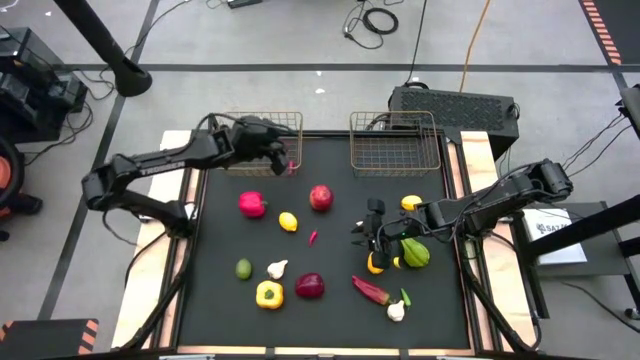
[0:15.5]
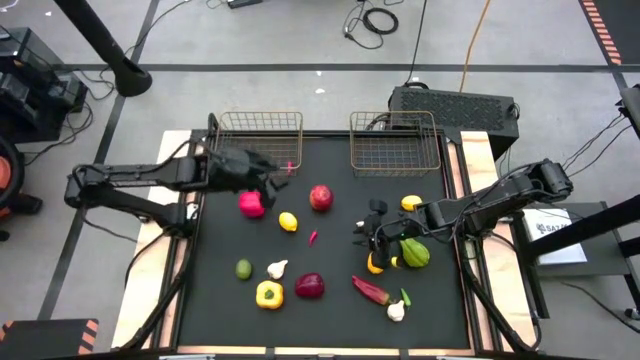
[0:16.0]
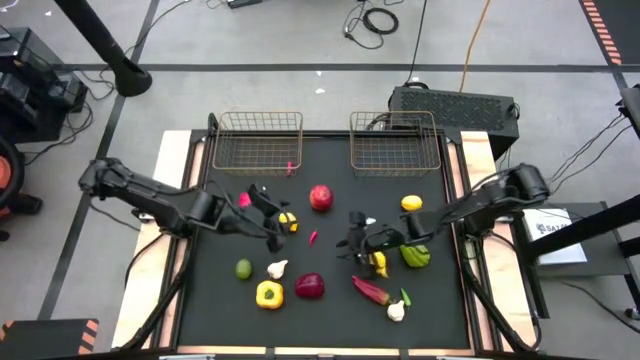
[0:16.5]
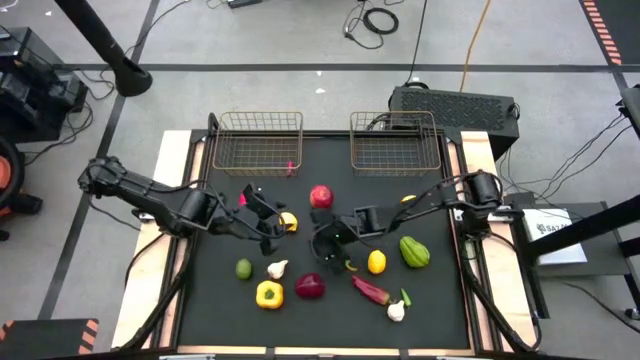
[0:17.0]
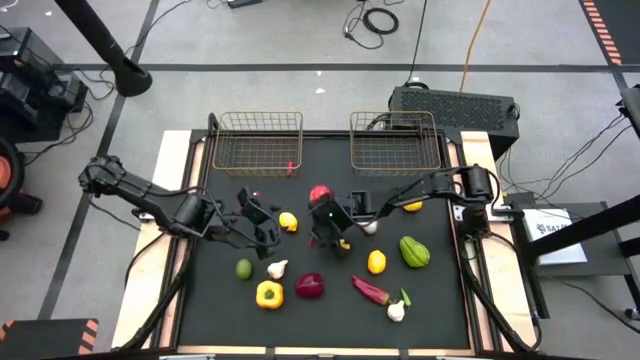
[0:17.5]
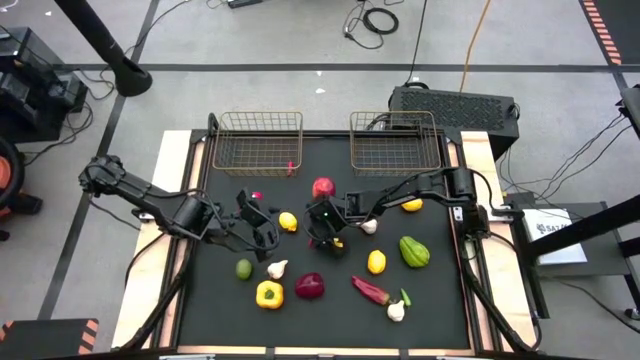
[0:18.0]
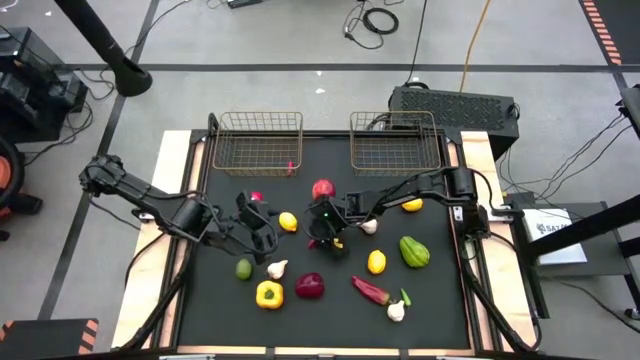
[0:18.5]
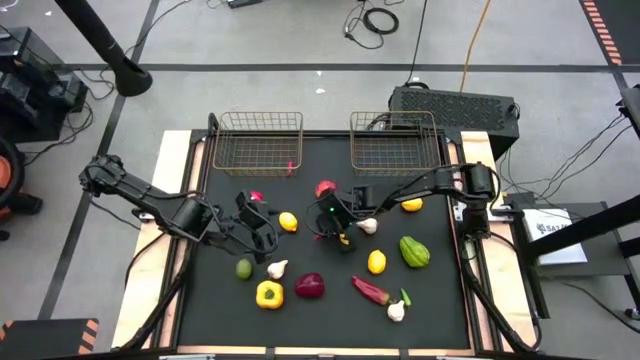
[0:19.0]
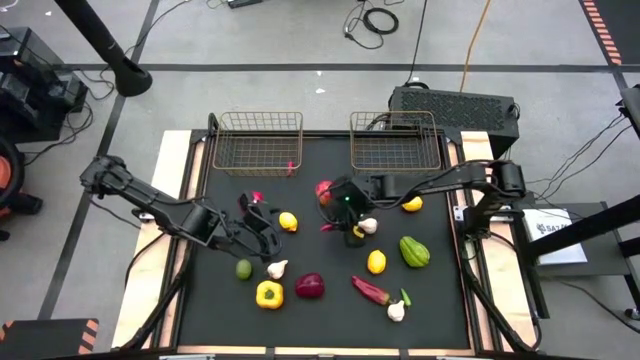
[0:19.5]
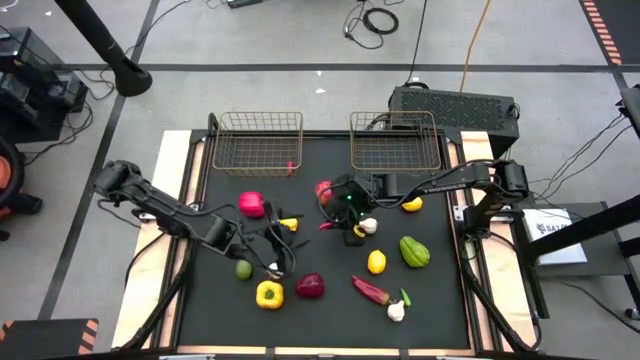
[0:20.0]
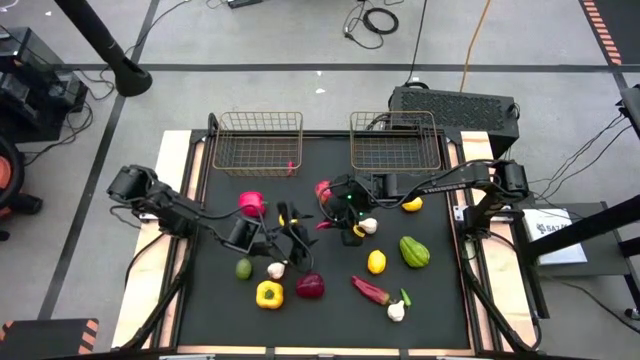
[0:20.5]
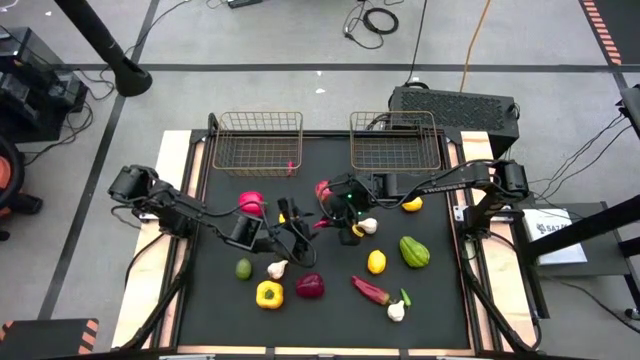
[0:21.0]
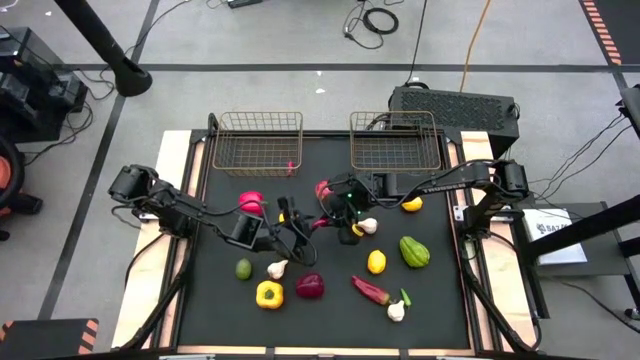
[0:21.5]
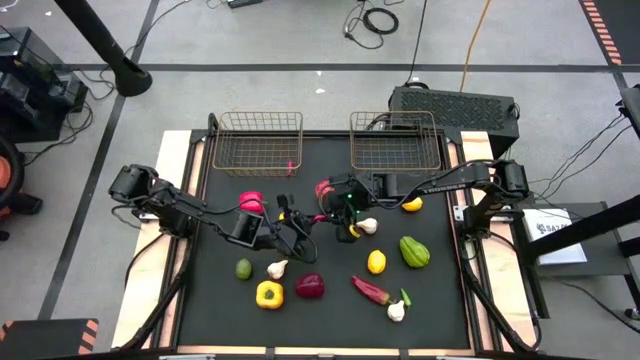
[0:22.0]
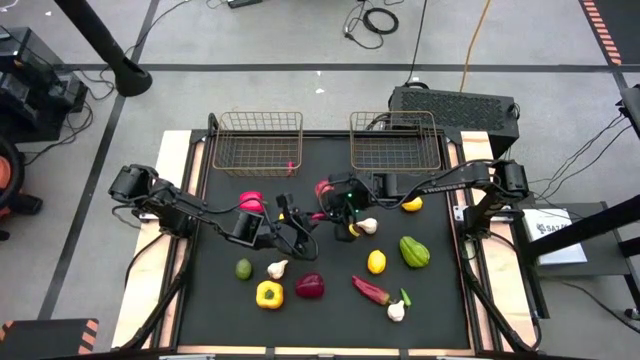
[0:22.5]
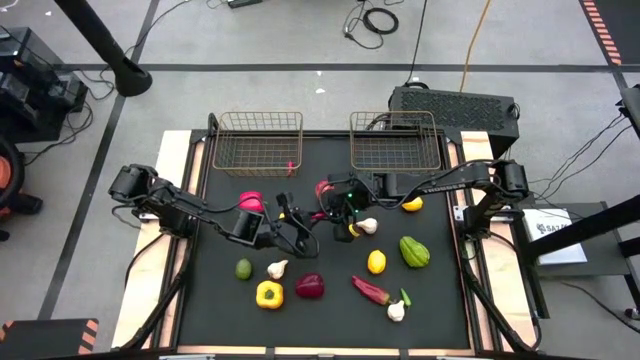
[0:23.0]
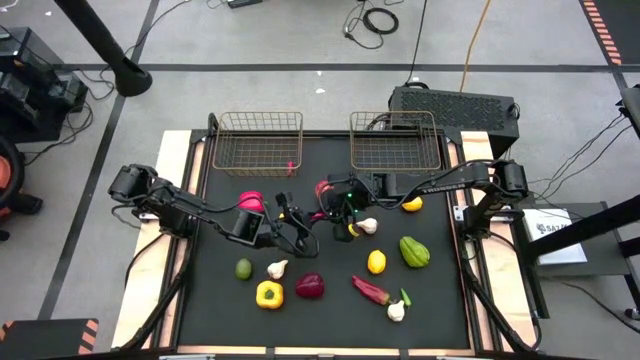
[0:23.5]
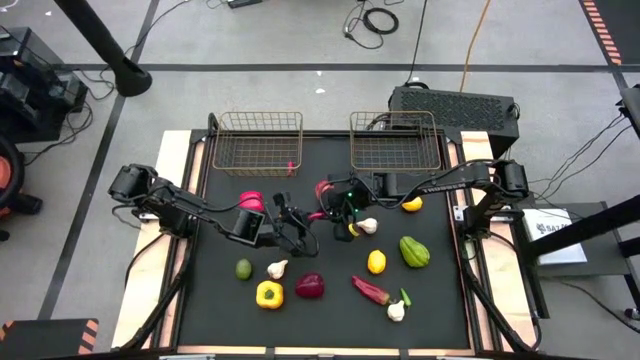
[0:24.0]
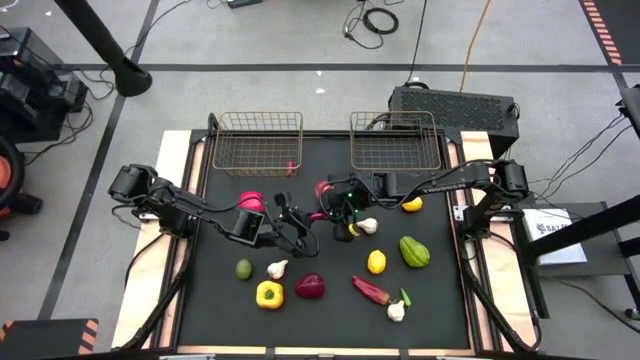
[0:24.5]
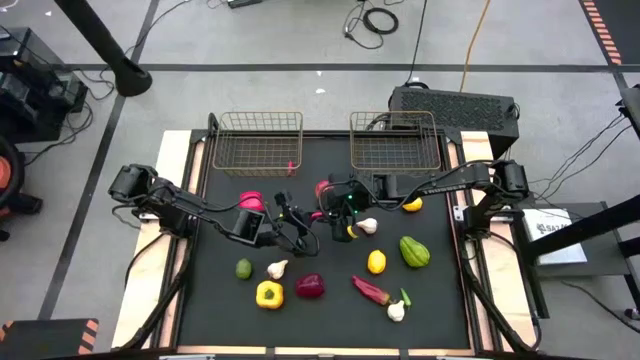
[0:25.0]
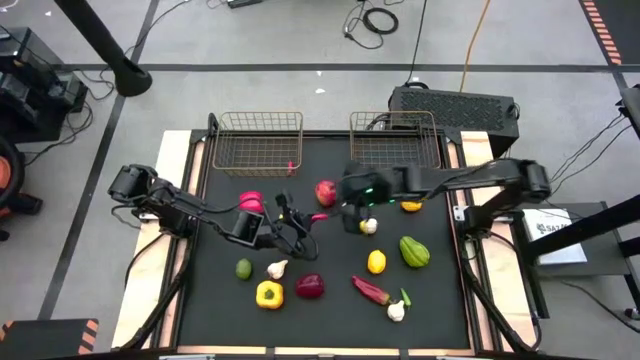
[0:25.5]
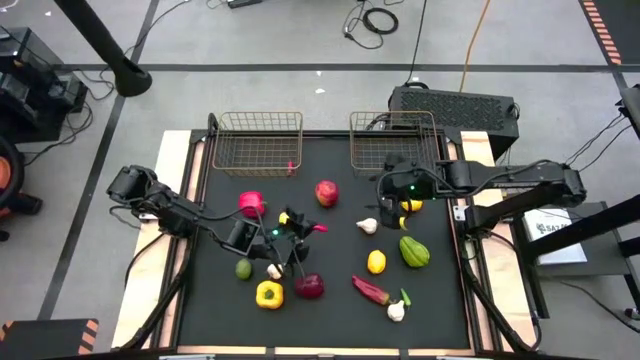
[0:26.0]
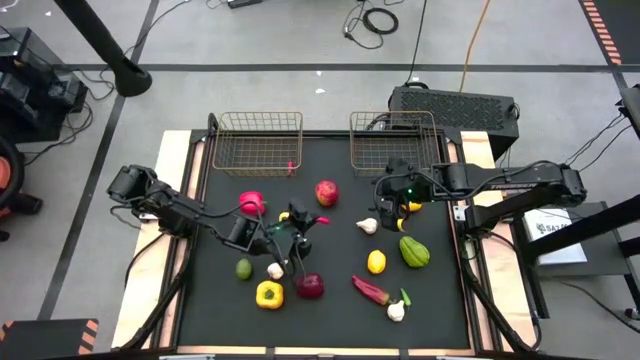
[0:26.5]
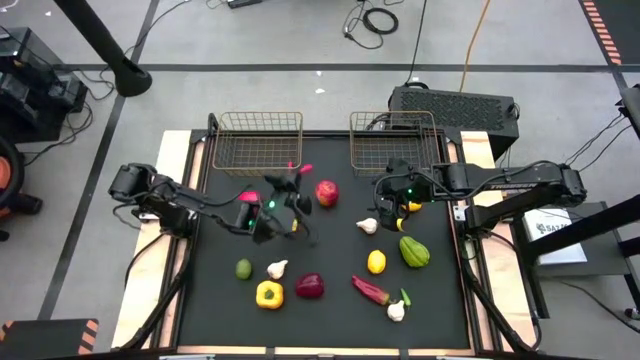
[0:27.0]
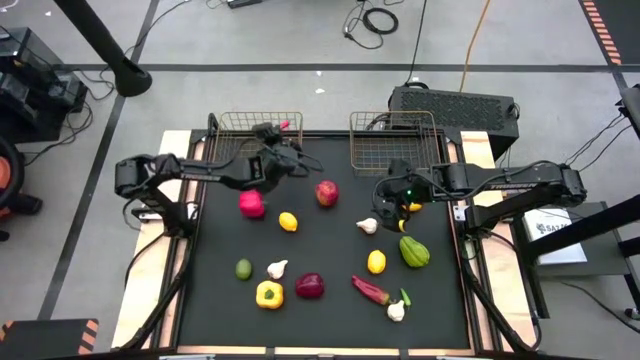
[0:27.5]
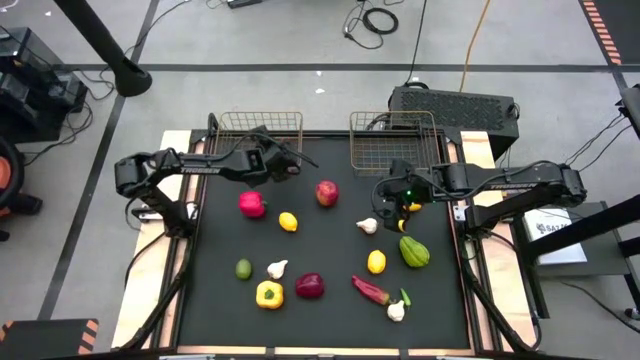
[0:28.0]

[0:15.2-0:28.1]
Task: Sort produce into baskets
Put the red chili pepper into the left wire basket

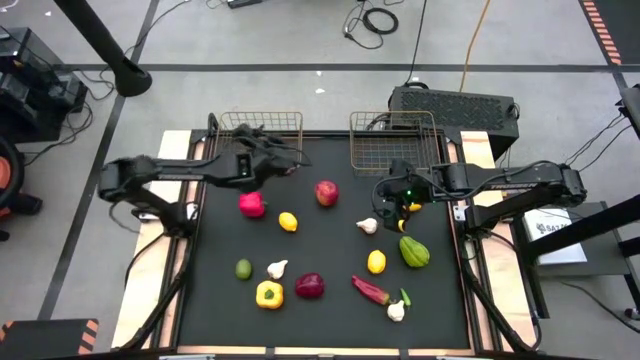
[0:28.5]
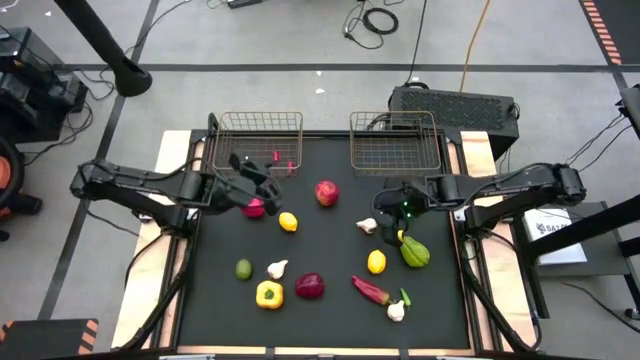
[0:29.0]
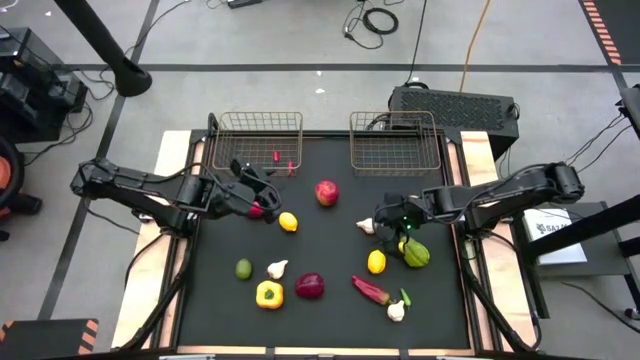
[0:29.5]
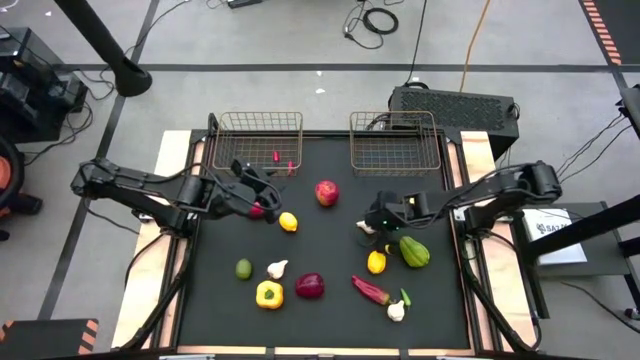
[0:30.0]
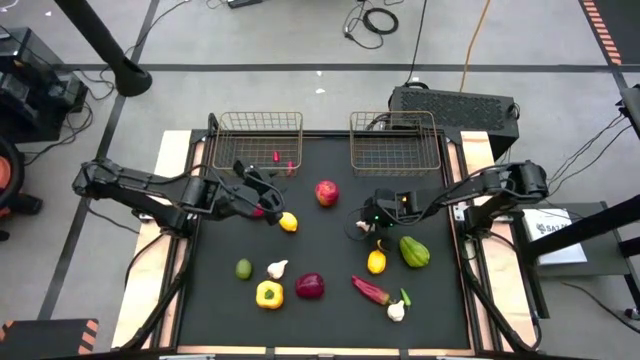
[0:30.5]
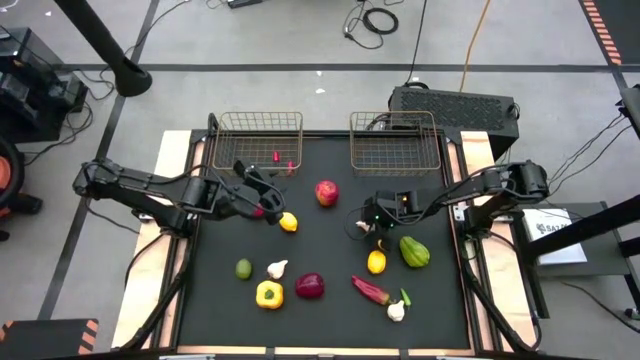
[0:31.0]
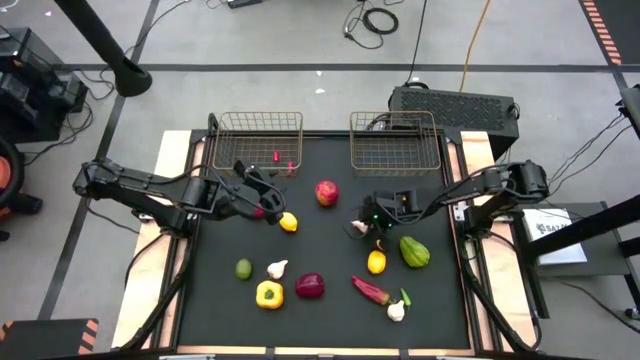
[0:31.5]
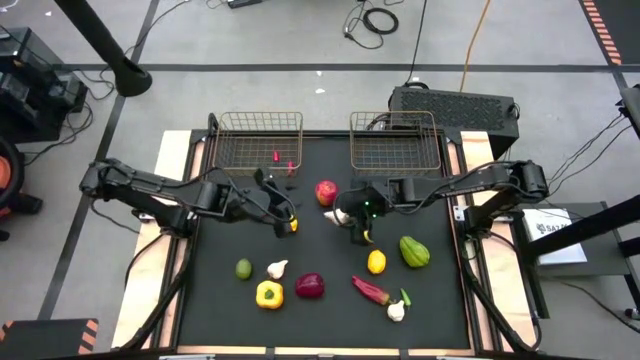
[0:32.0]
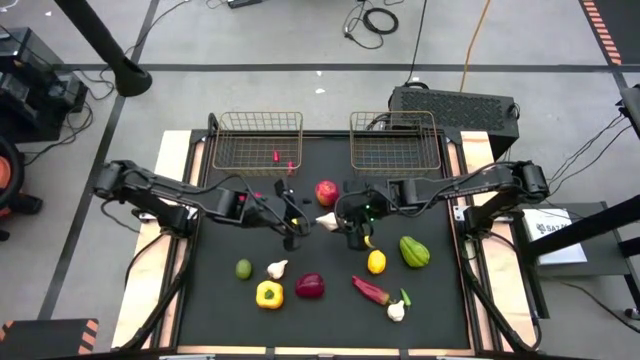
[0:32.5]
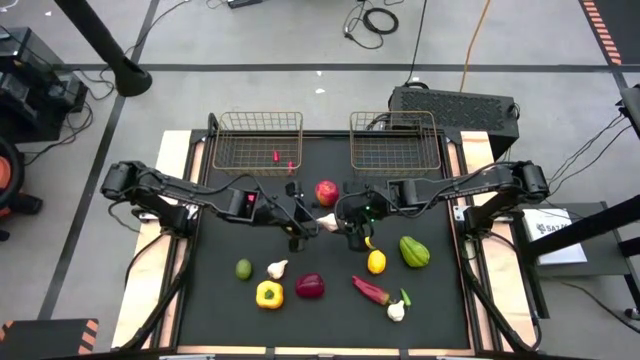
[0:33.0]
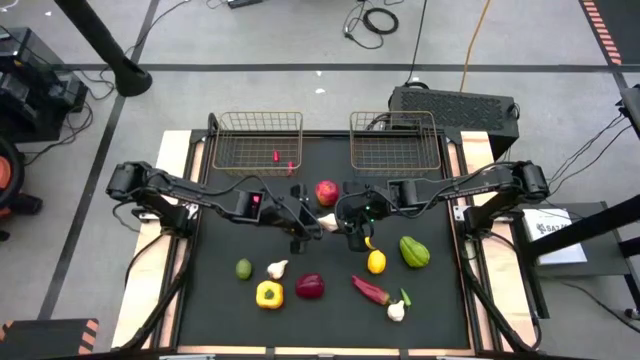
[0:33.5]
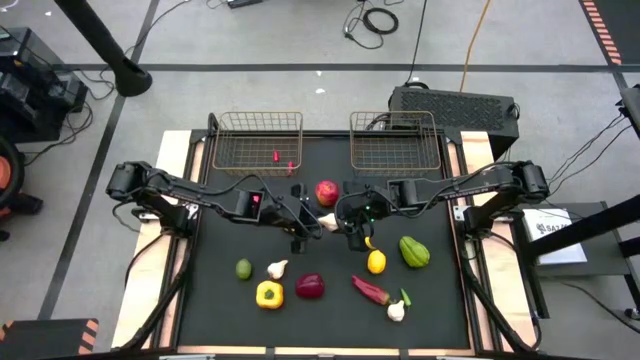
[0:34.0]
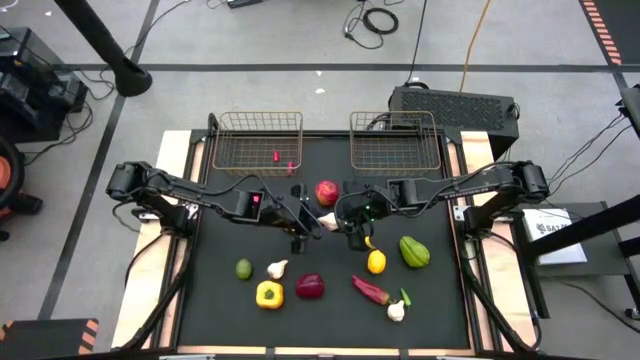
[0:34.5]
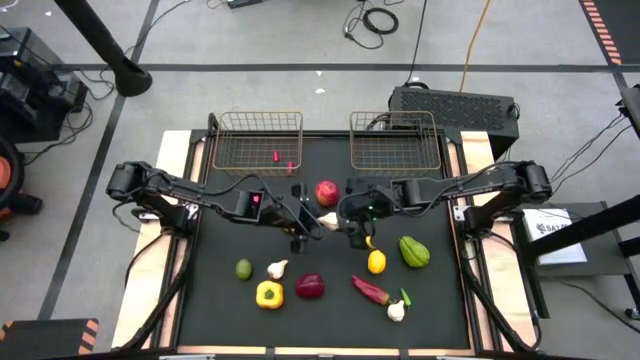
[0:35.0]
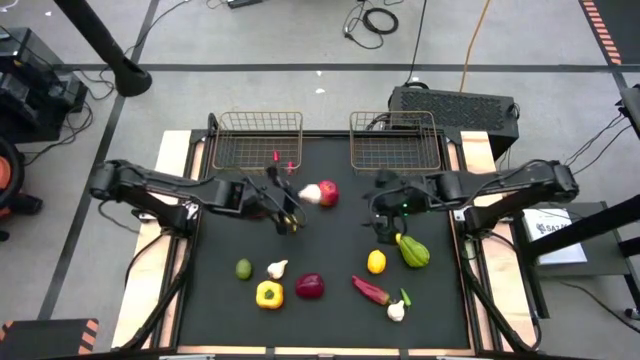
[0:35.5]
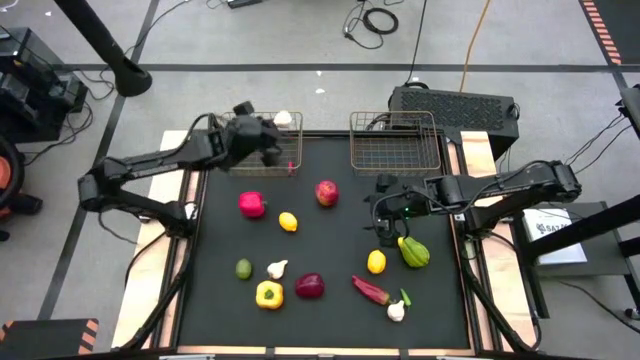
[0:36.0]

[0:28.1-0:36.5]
Put the top right garlic into the left wire basket

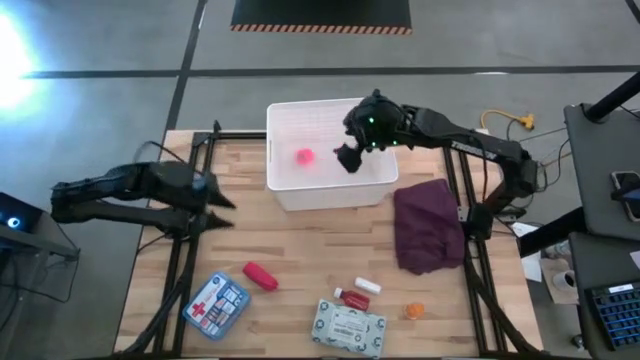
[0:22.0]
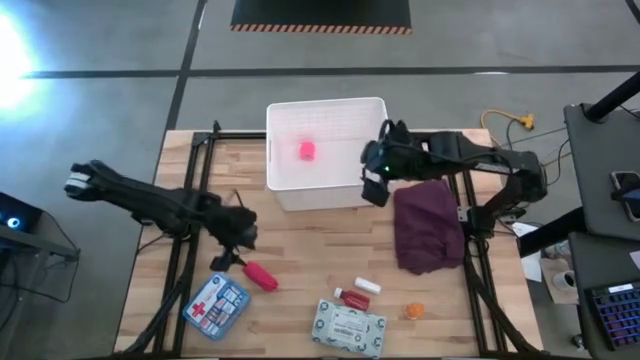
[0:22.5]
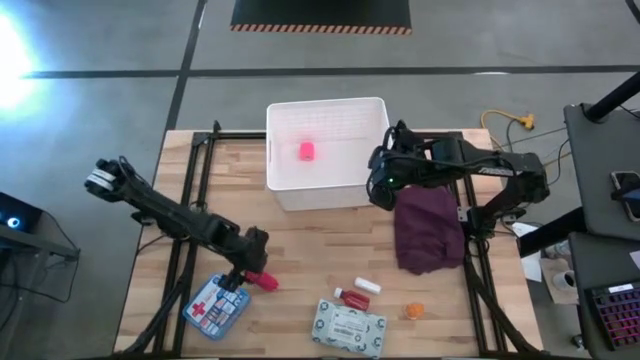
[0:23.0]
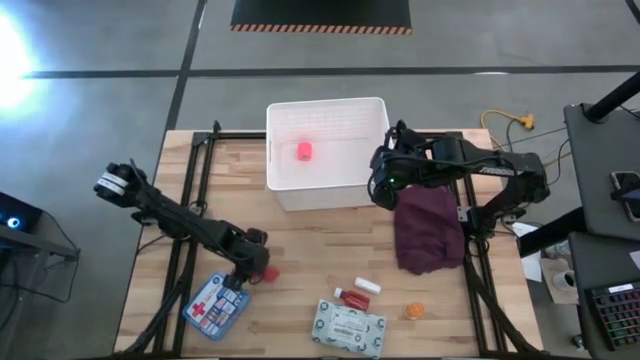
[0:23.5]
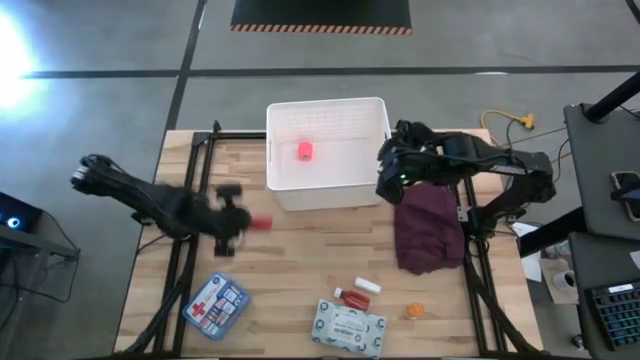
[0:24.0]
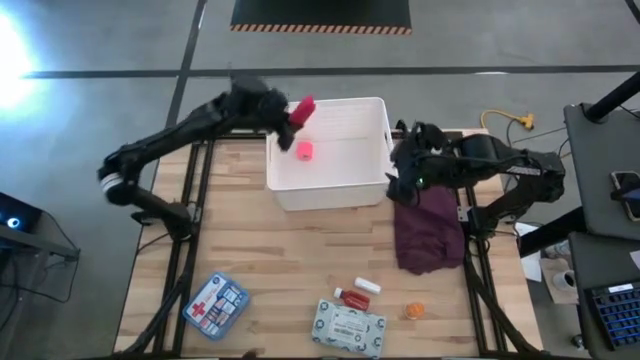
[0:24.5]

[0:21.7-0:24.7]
Task: Pick & place medical supplies in basket/bin
Put the red bandage into the white bin
